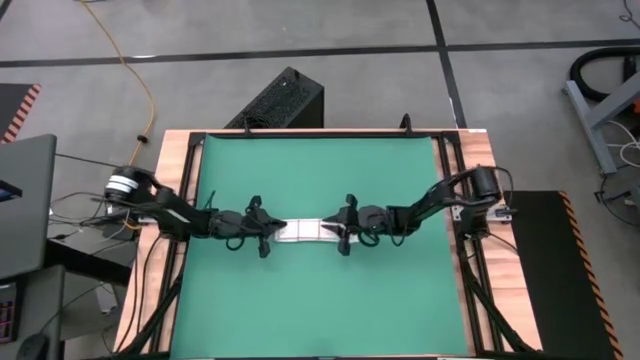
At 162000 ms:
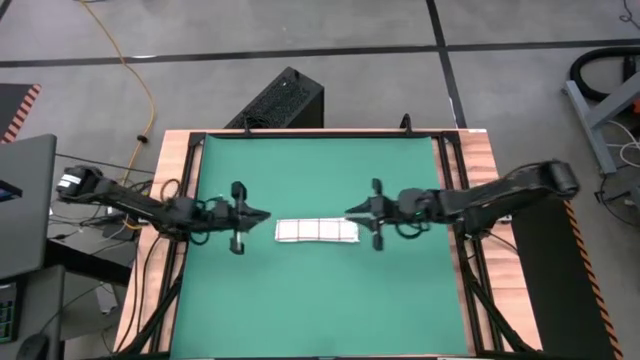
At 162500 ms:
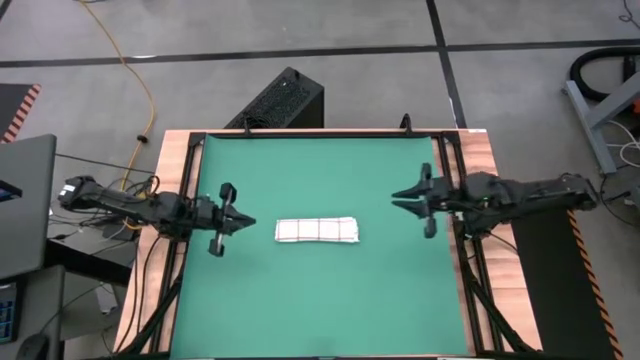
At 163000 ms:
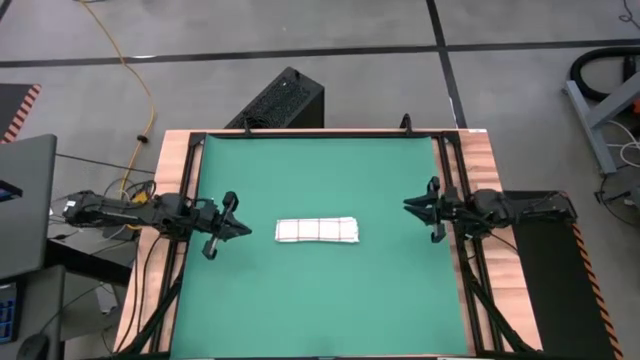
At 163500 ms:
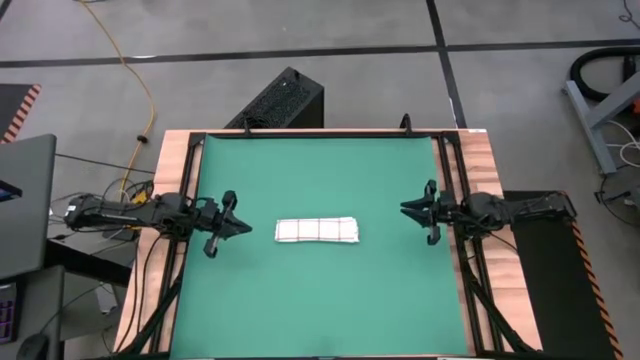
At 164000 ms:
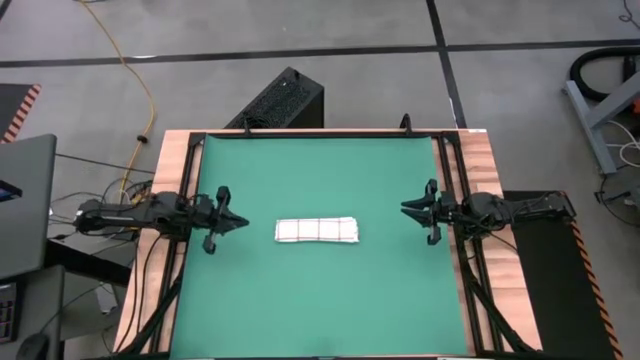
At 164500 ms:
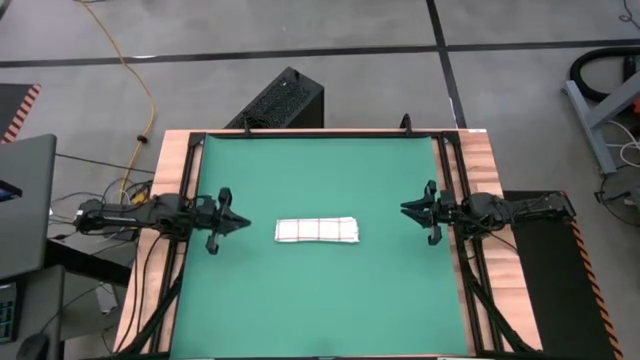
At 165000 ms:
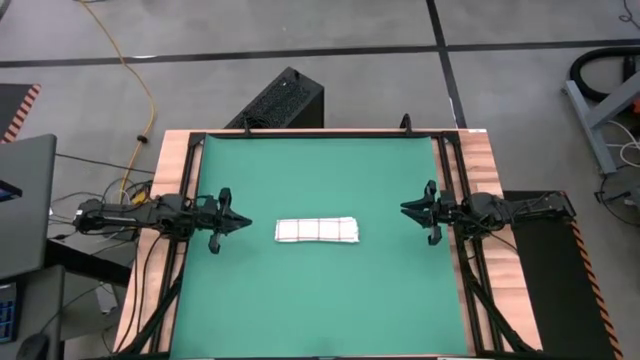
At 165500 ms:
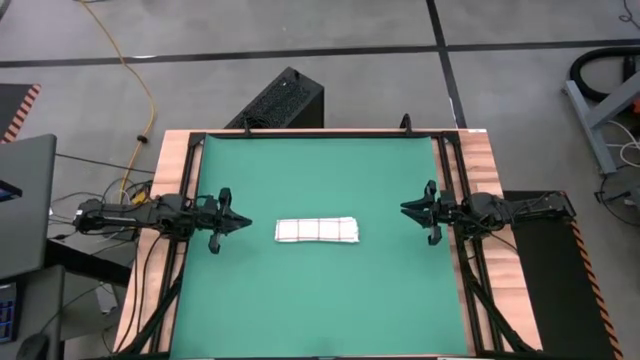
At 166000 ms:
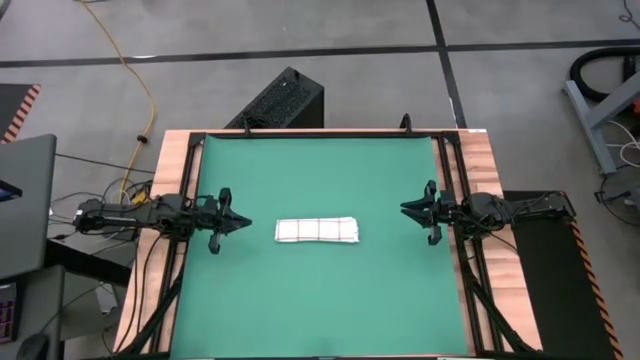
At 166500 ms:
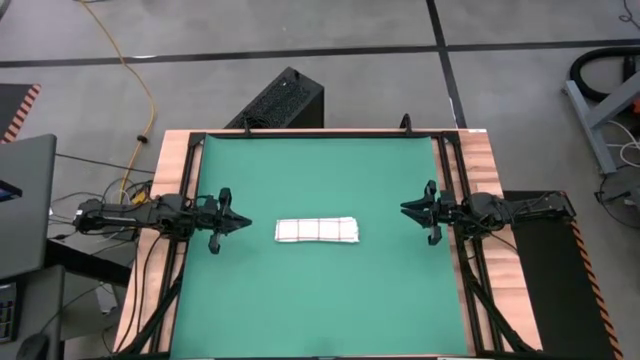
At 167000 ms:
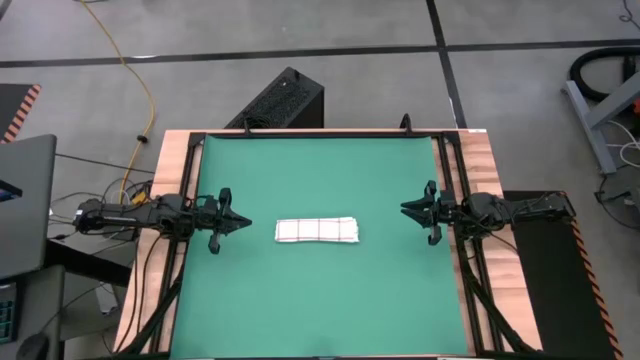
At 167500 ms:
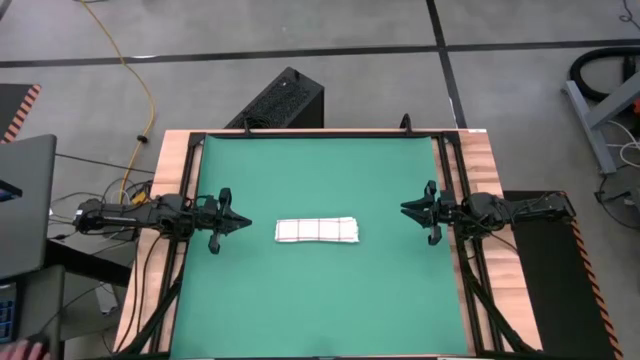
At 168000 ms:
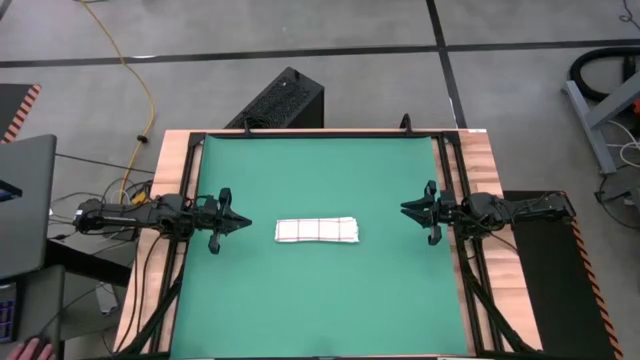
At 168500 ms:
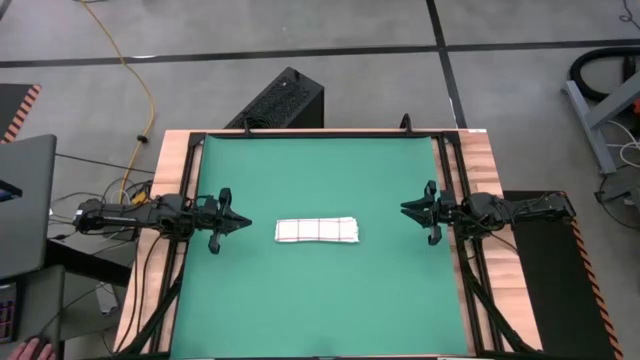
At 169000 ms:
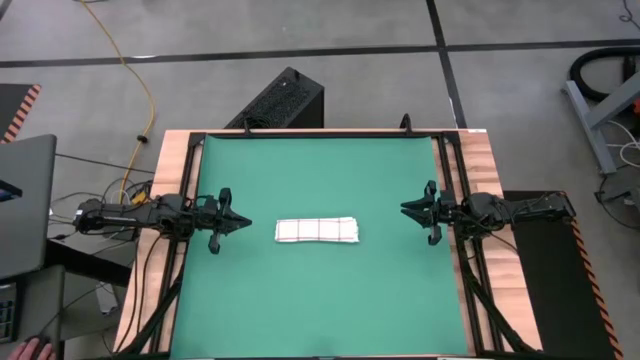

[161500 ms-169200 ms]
Task: Roll towel into tight, uniform cylinder
Return to Home Position

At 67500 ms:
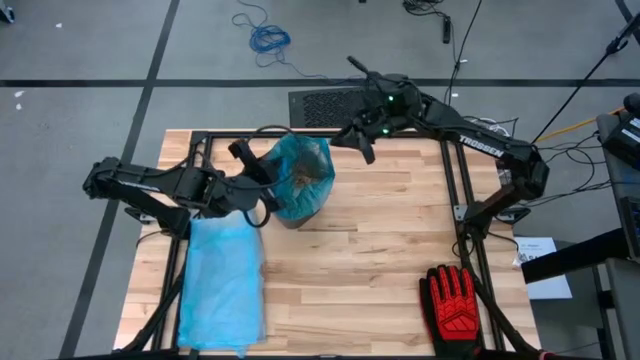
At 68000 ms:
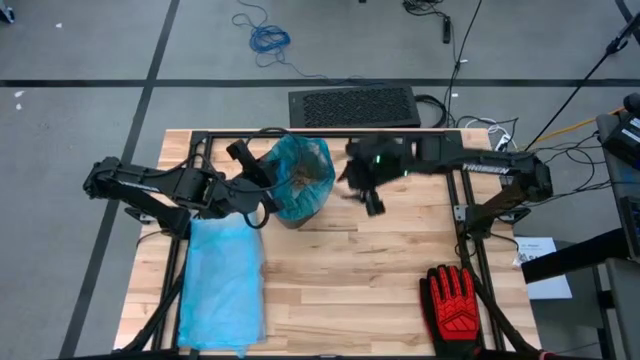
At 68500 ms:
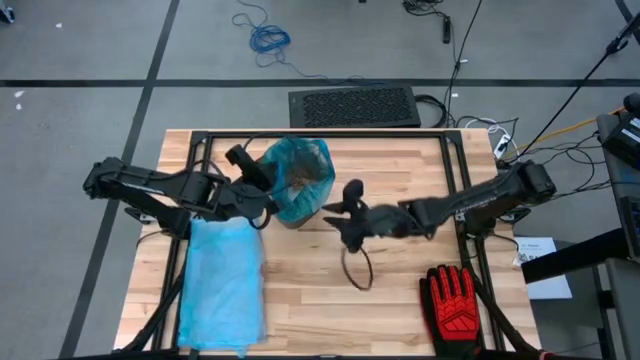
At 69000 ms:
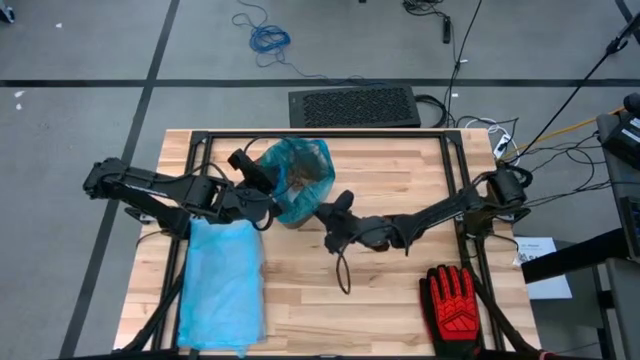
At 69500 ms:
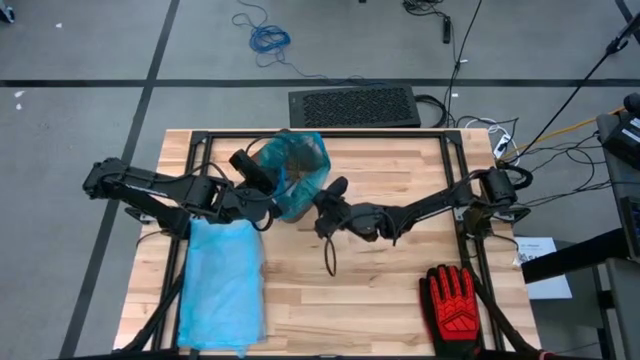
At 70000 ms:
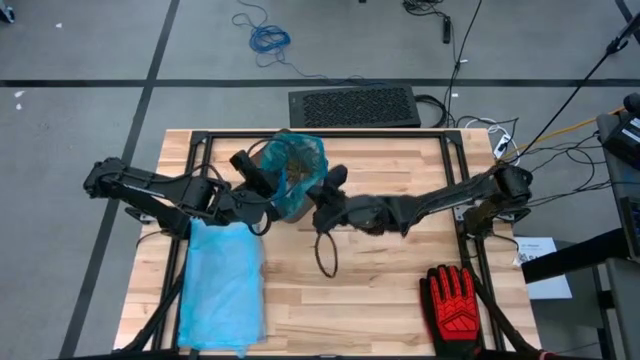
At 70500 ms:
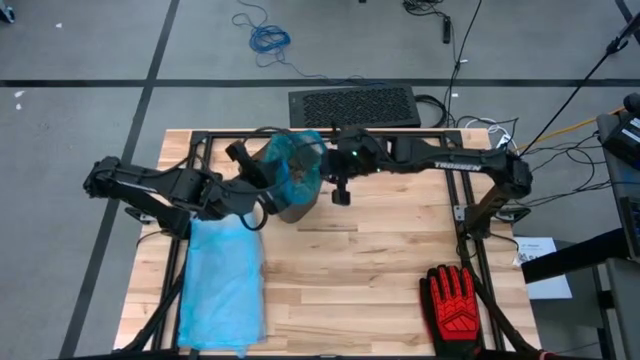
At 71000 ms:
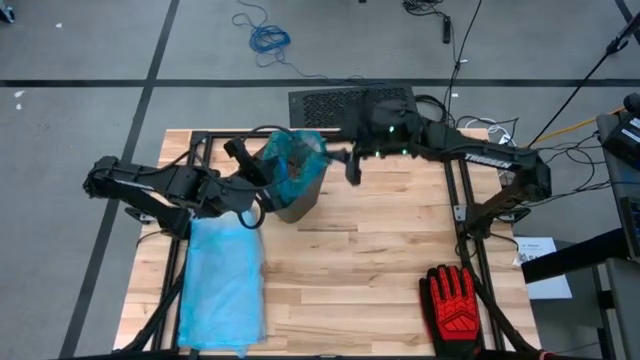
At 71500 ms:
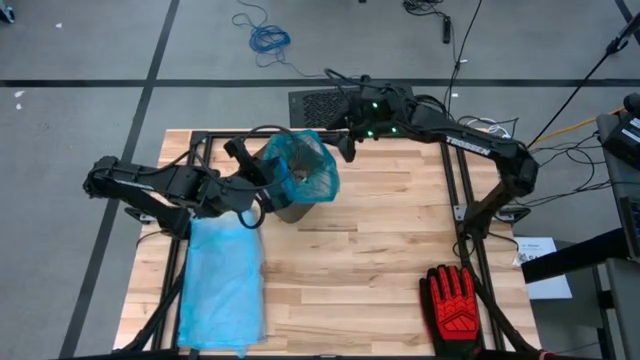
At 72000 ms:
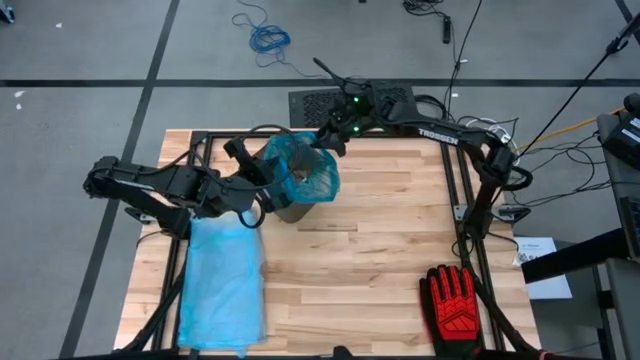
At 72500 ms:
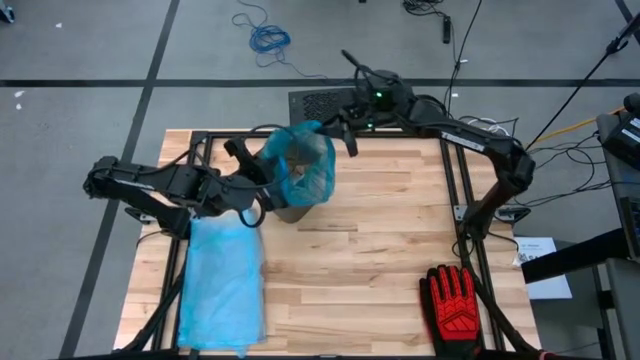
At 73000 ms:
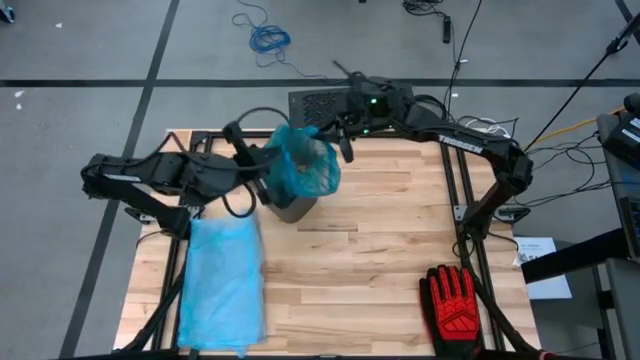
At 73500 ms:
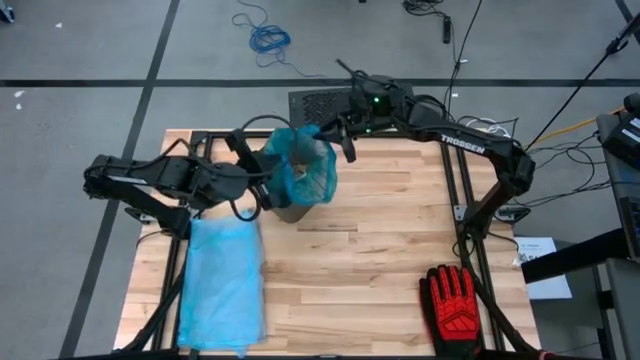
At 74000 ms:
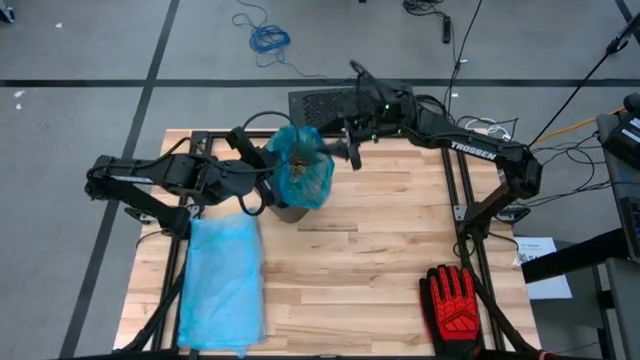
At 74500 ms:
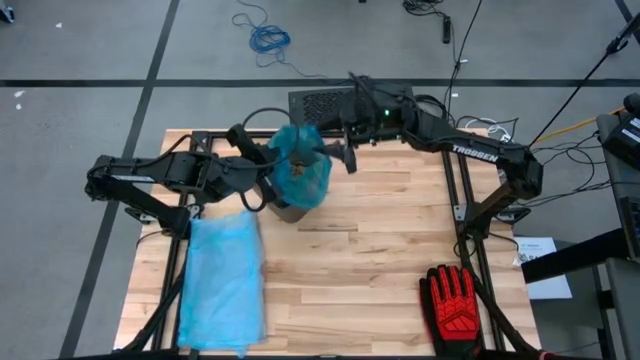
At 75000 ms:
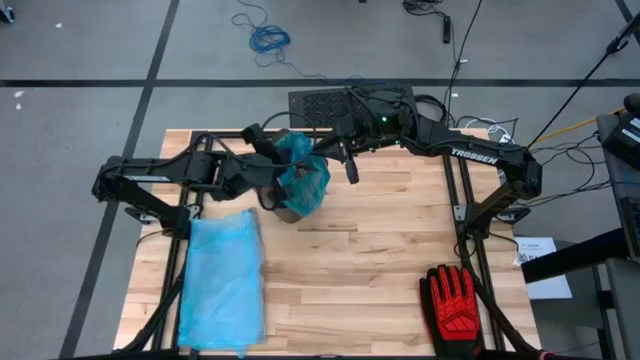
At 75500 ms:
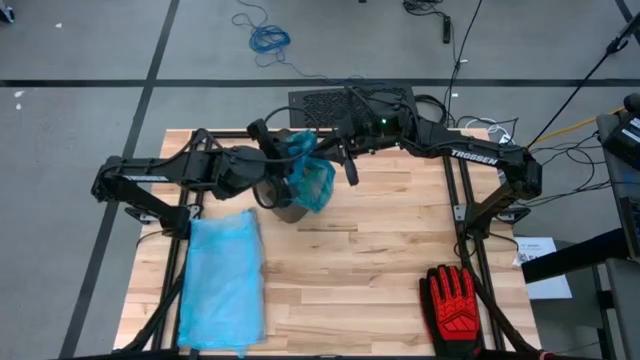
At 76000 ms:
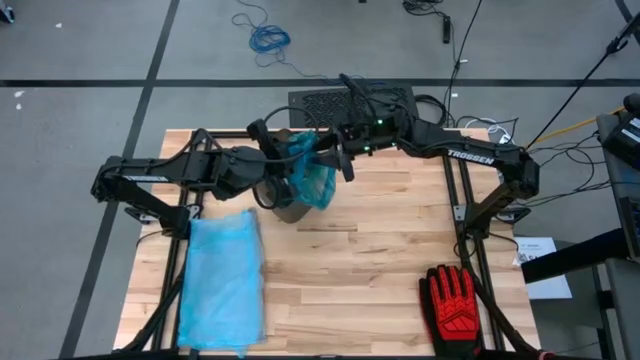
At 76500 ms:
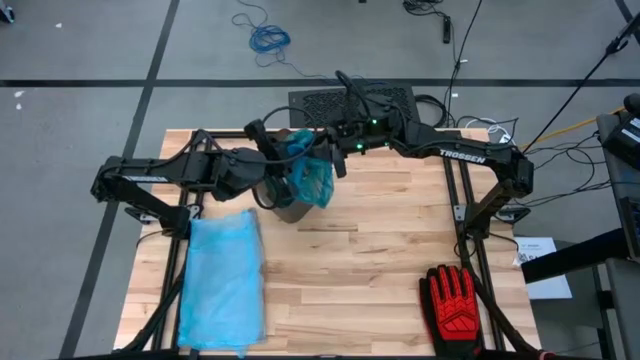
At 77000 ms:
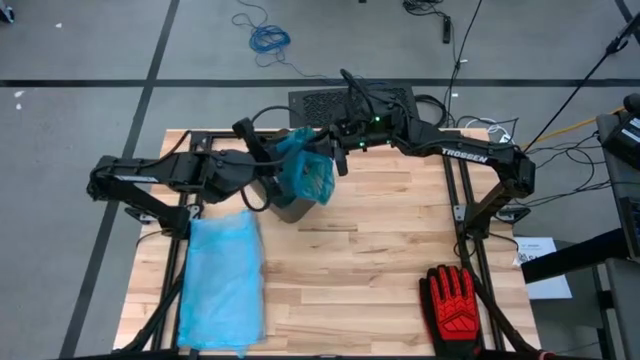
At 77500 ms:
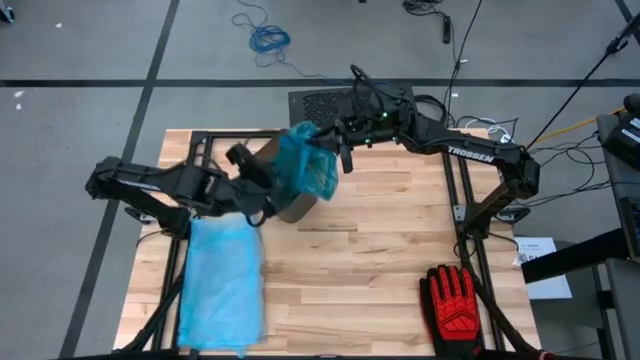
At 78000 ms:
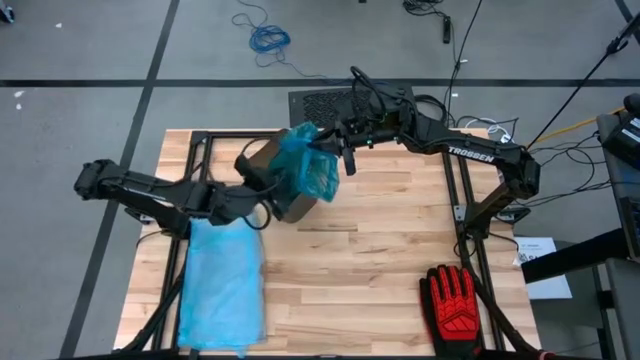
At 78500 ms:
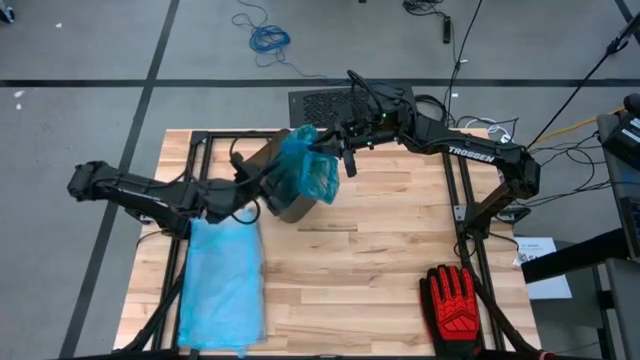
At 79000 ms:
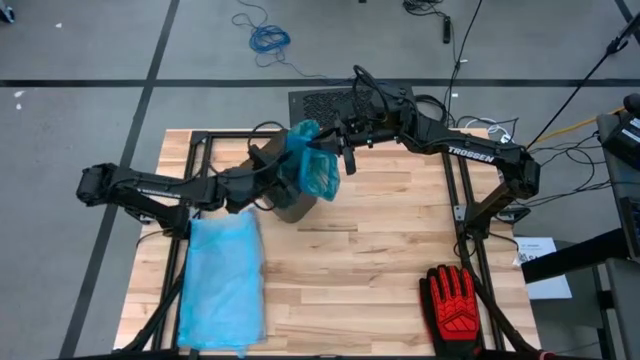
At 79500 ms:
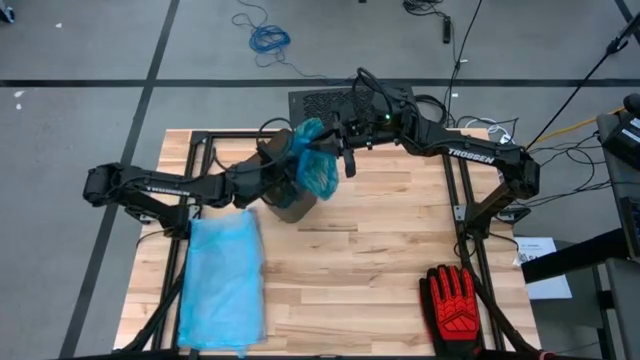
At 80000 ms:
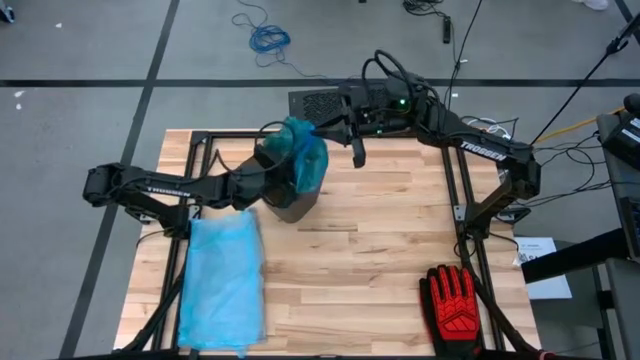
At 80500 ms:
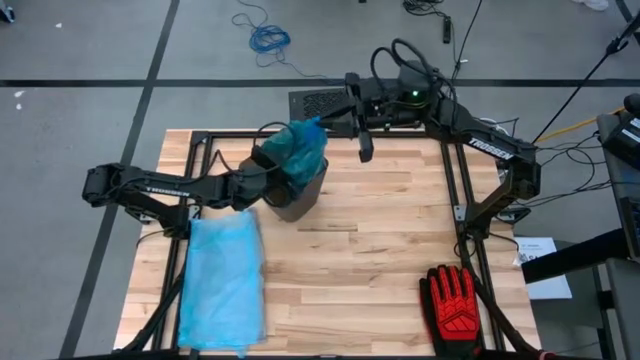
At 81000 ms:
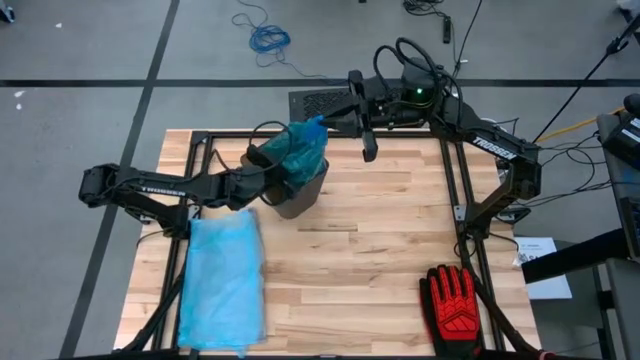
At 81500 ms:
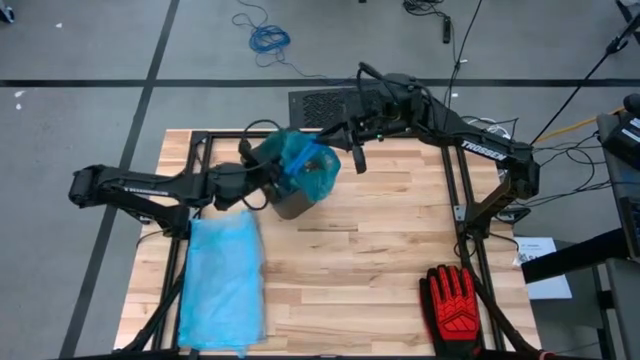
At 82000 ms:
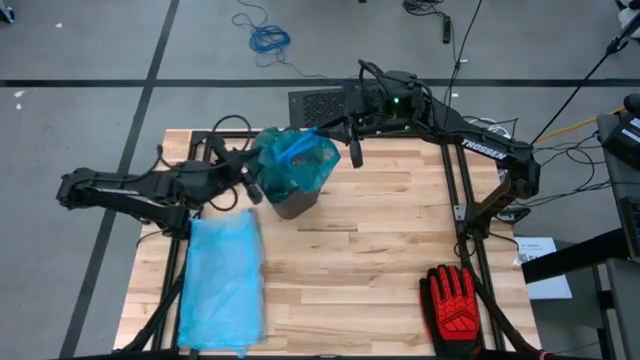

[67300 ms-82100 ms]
Task: place trash/remove bag and relplace
Remove the blue trash bag from the black trash bin
